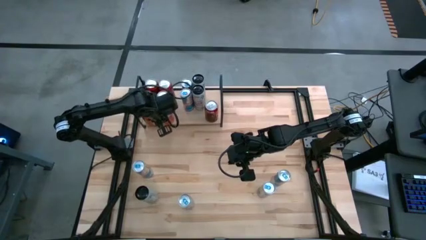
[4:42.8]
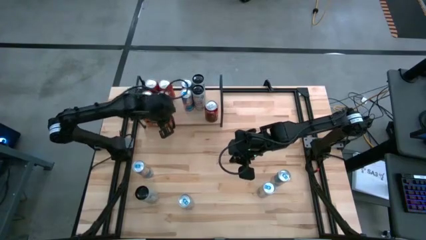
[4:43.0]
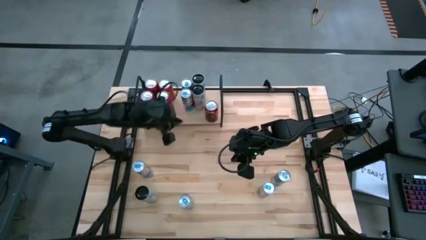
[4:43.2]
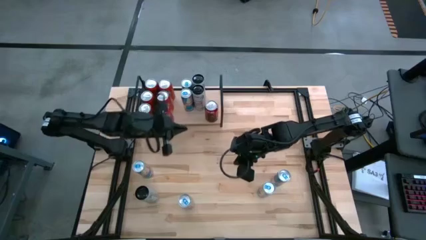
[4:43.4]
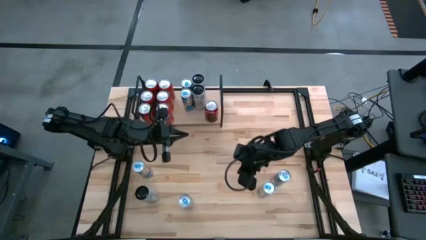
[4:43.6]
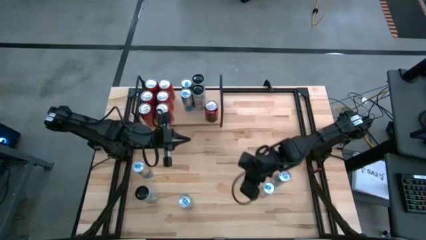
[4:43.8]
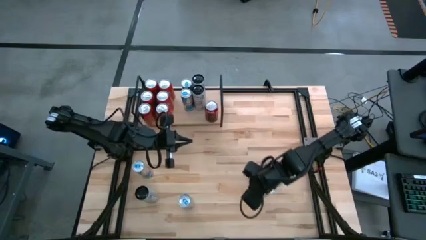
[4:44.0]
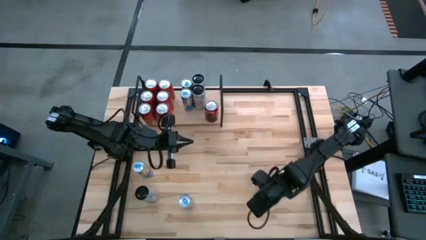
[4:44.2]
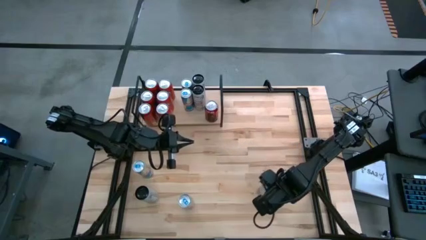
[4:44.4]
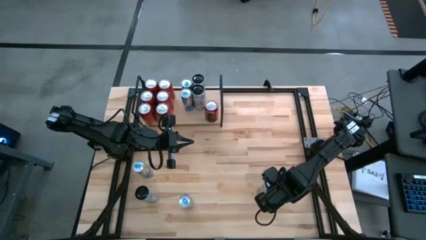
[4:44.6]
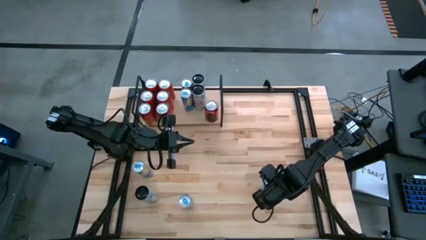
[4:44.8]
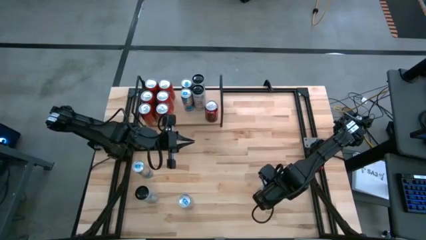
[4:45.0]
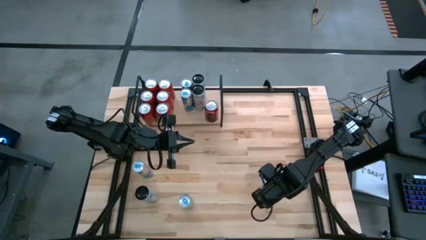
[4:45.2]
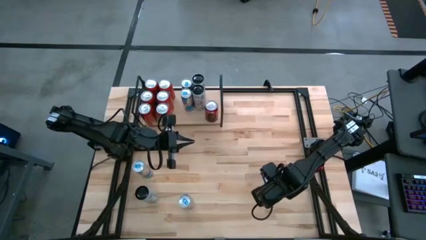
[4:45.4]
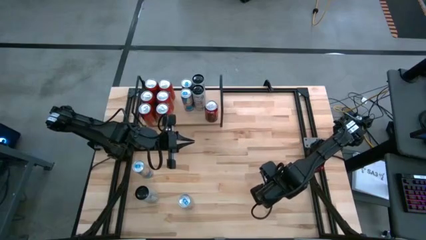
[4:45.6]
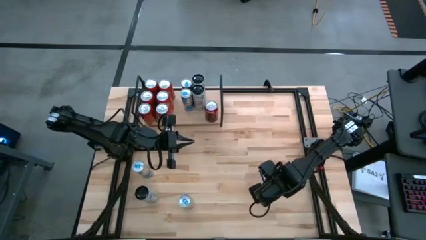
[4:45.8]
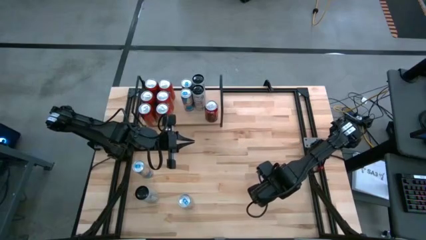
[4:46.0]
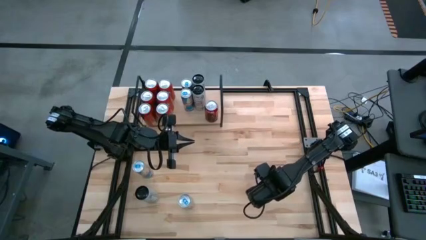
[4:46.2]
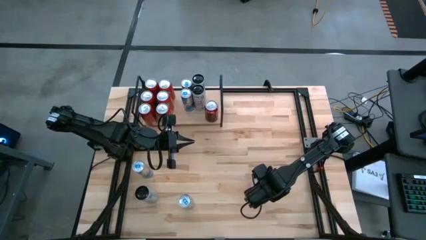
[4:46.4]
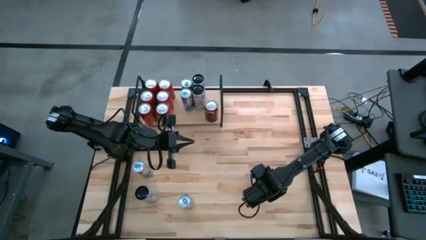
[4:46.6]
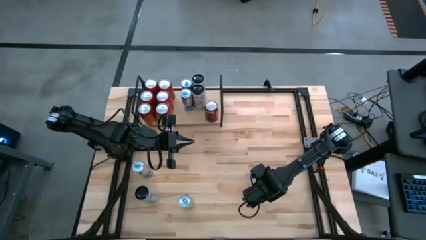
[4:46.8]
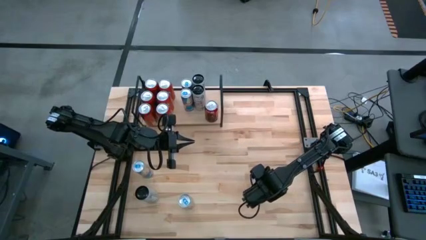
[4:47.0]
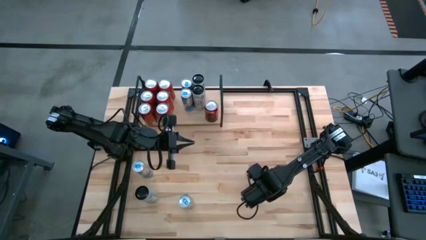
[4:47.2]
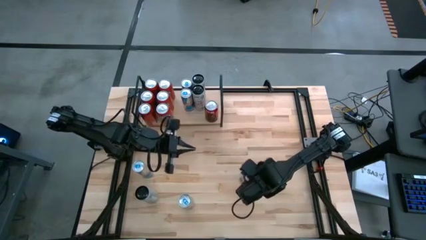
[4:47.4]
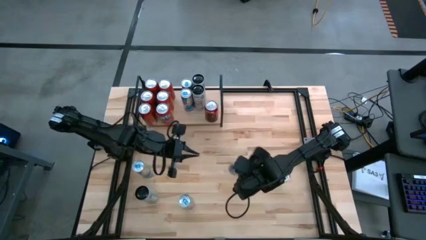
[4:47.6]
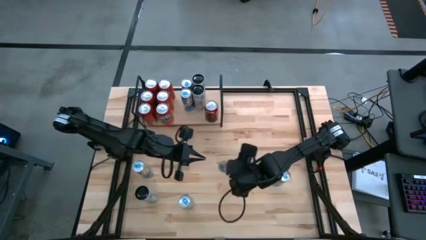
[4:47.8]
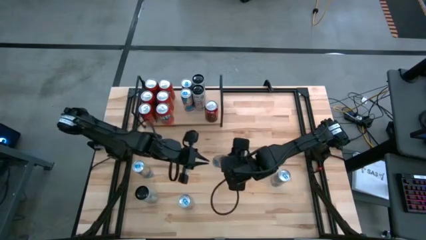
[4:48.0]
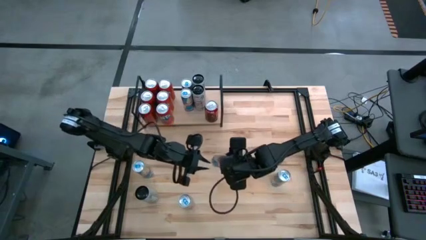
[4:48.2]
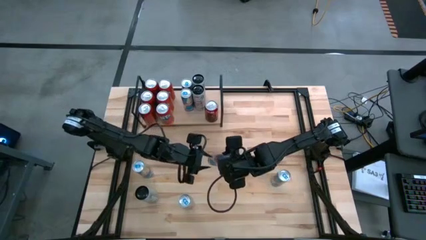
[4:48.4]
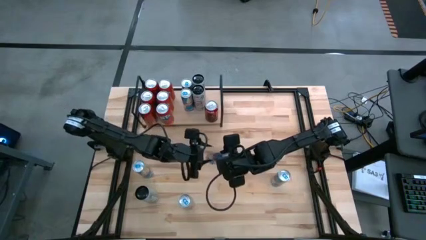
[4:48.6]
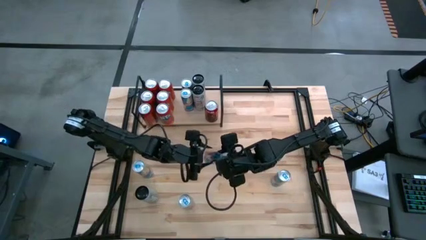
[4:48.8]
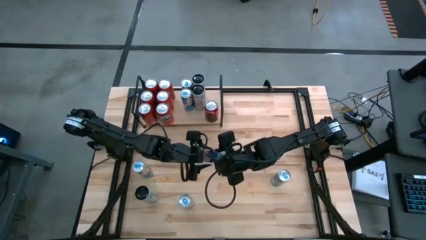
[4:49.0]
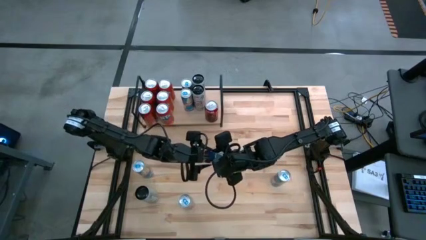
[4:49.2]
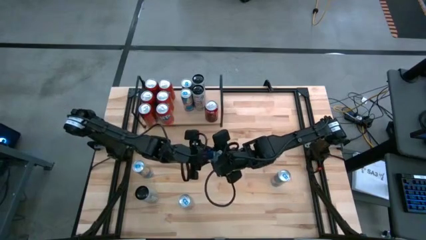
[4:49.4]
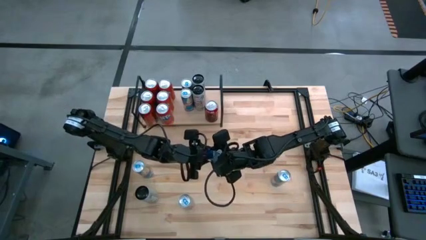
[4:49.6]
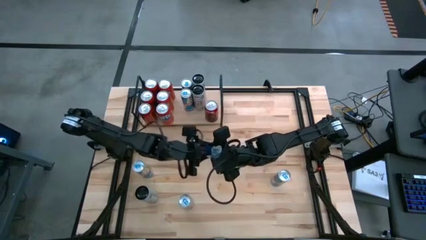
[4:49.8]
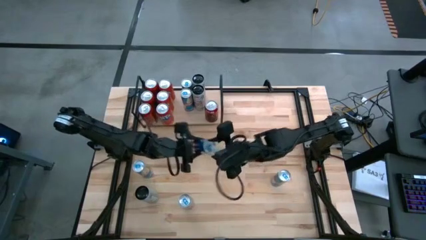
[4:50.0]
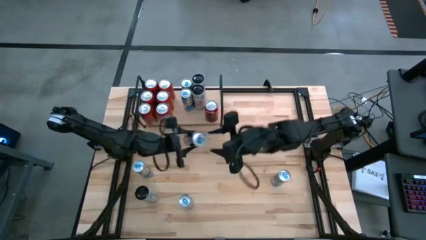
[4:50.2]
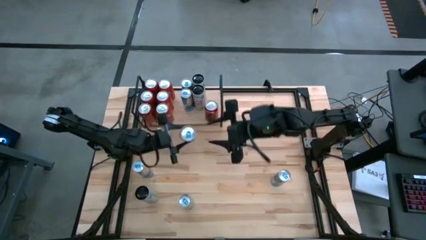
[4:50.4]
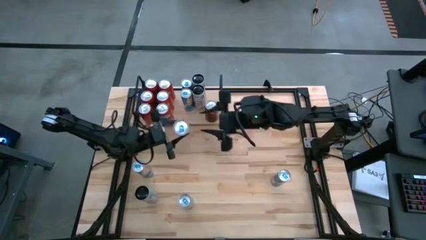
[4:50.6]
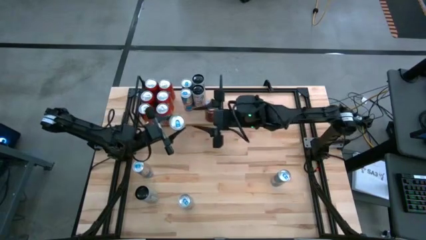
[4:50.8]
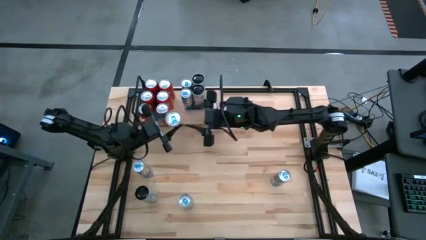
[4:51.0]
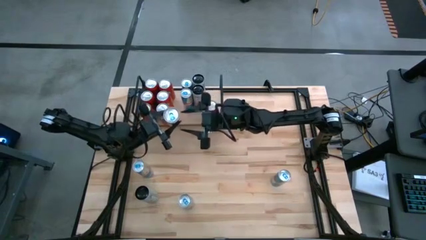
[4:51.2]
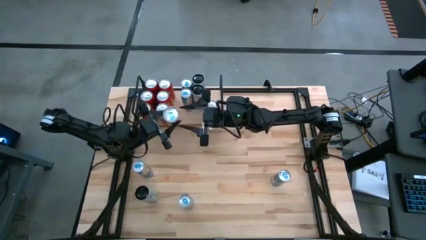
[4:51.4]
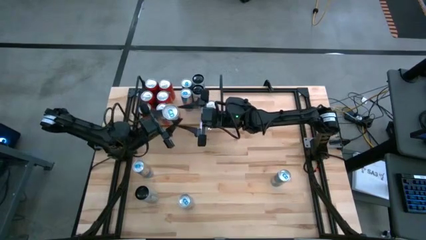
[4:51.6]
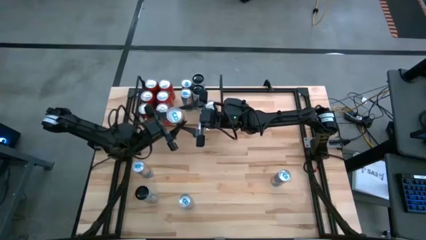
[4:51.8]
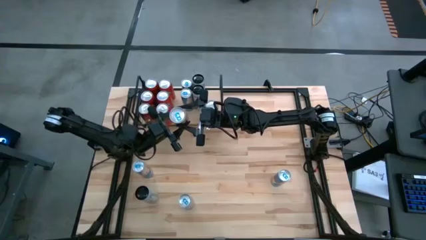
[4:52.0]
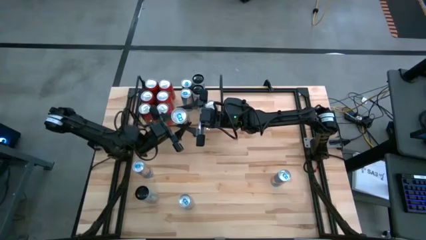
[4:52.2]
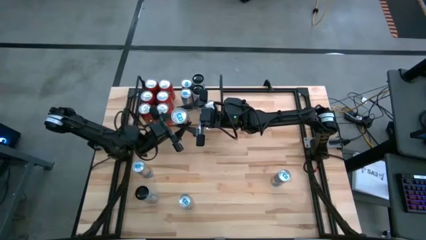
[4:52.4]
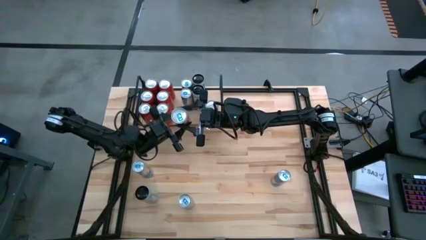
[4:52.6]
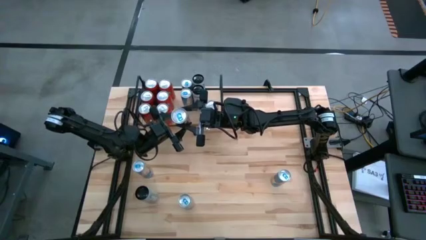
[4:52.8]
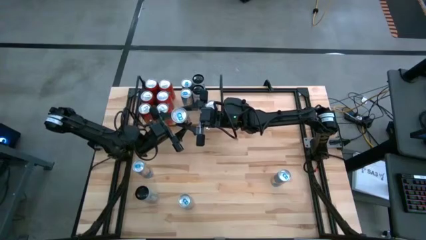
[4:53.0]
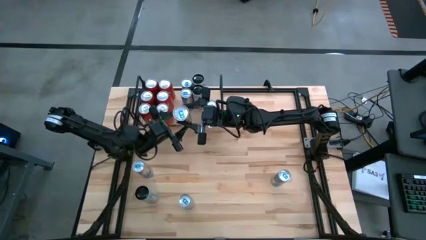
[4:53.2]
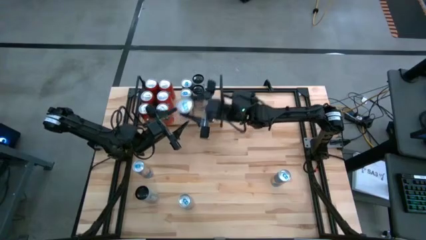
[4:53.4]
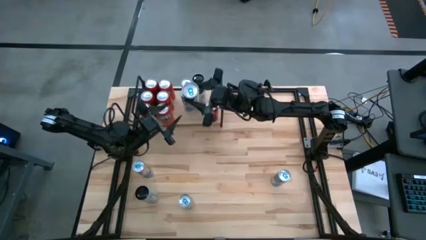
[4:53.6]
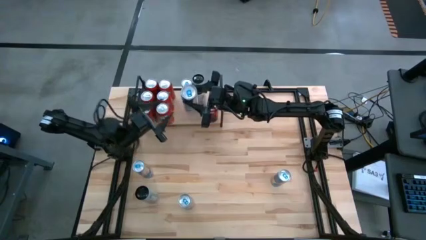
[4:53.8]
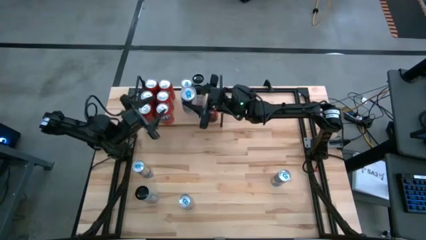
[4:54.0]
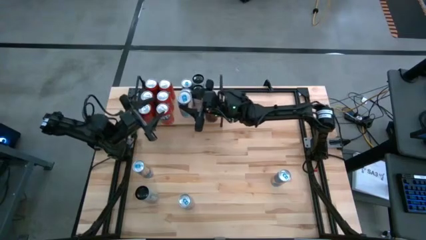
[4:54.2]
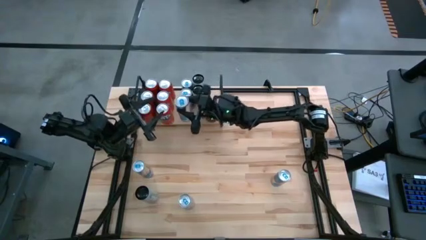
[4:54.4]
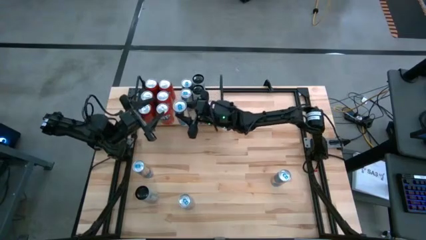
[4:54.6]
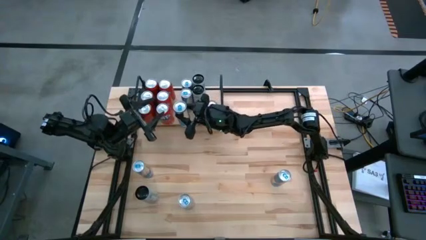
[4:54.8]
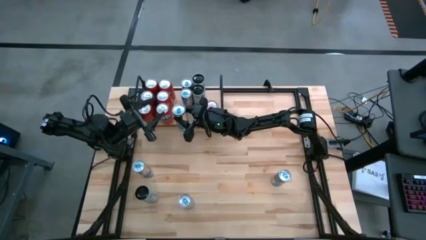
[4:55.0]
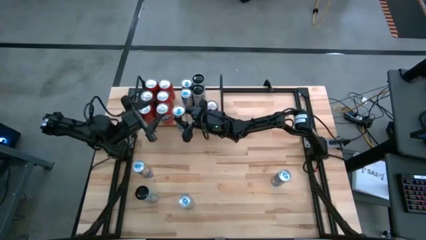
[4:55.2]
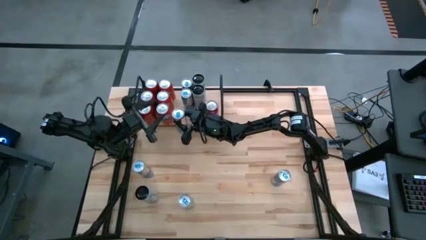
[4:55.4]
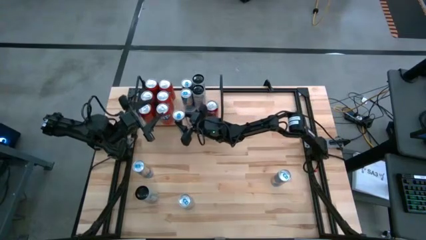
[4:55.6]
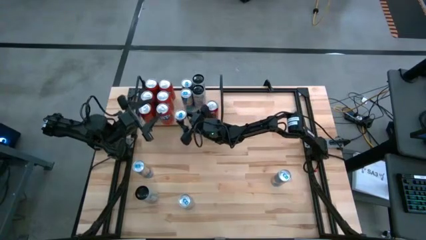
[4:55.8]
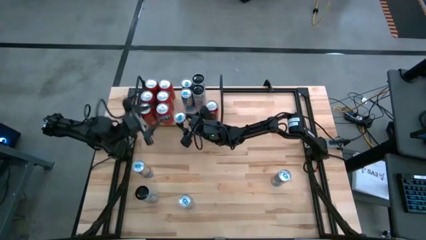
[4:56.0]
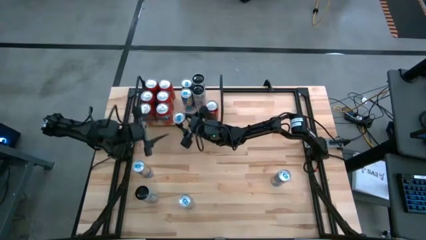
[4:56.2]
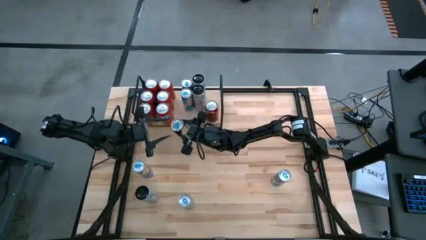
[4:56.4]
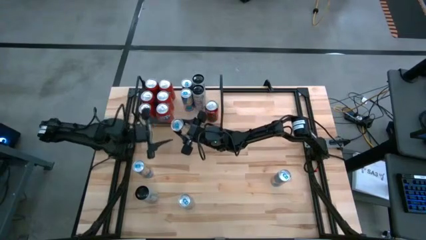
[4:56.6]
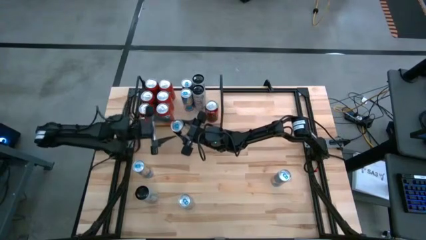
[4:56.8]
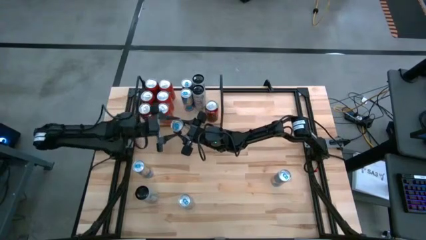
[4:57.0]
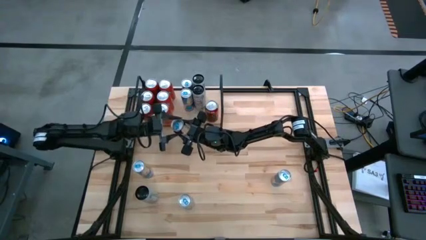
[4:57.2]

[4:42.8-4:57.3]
Task: Place canned beverage on shelf
Put the blue soda can on the shelf aligned with the other blue soda can
